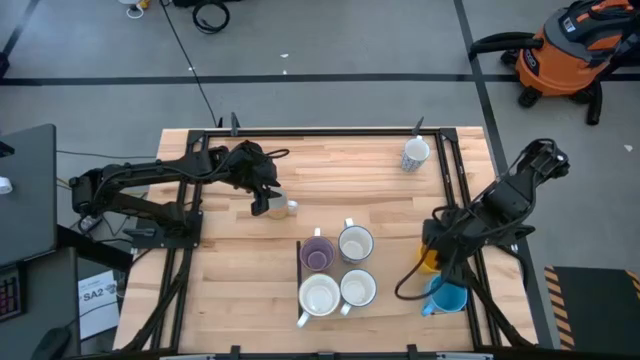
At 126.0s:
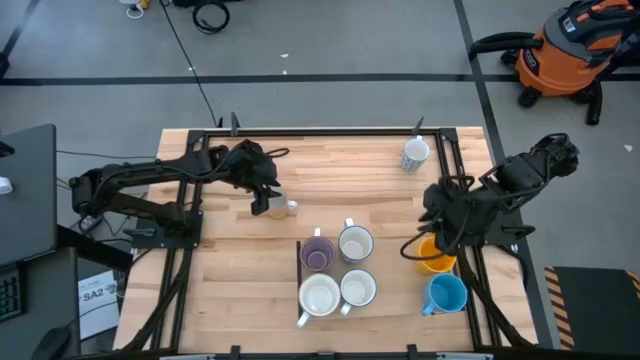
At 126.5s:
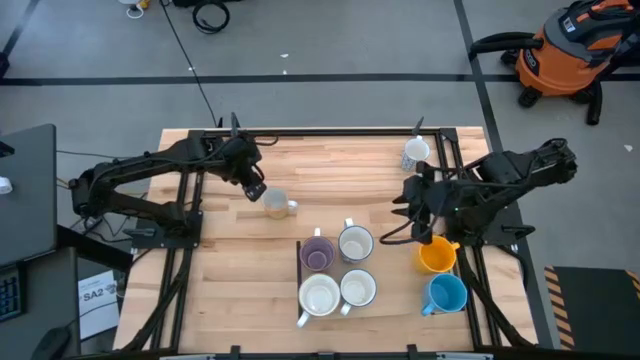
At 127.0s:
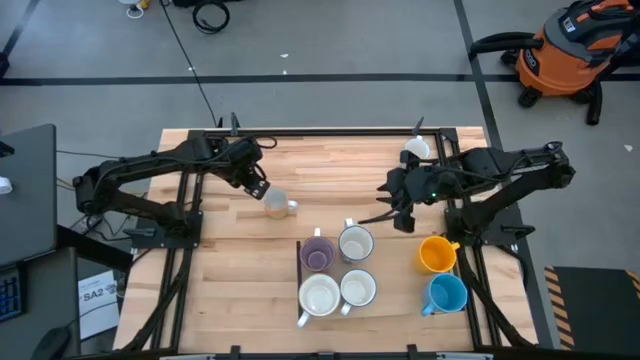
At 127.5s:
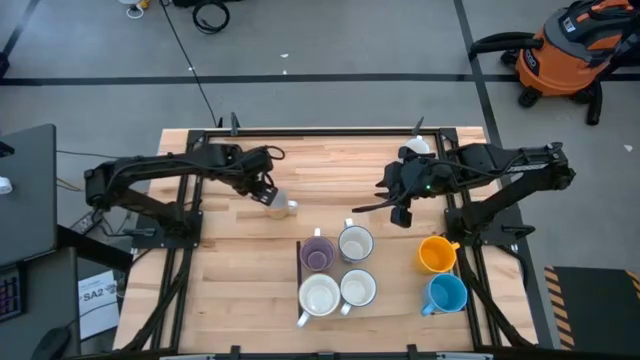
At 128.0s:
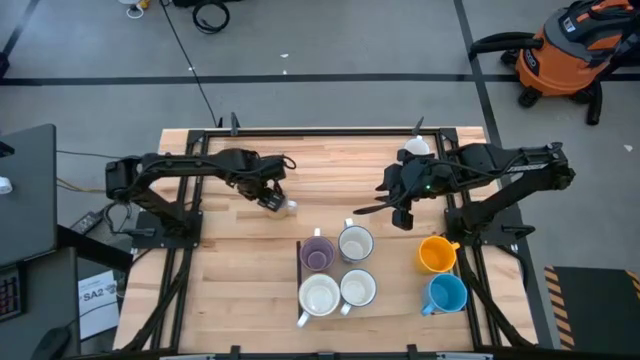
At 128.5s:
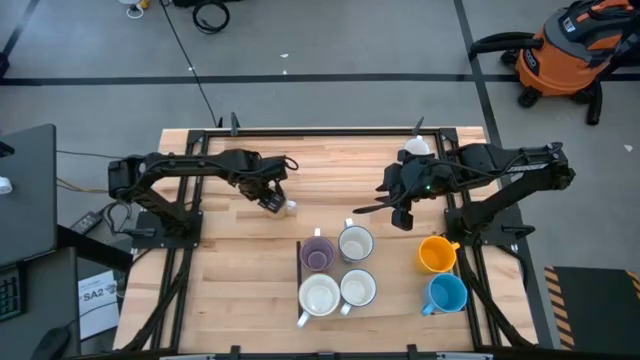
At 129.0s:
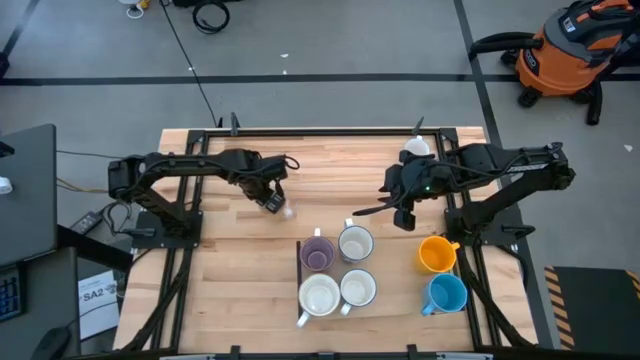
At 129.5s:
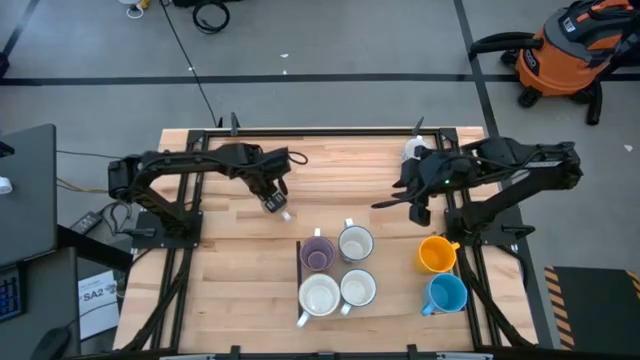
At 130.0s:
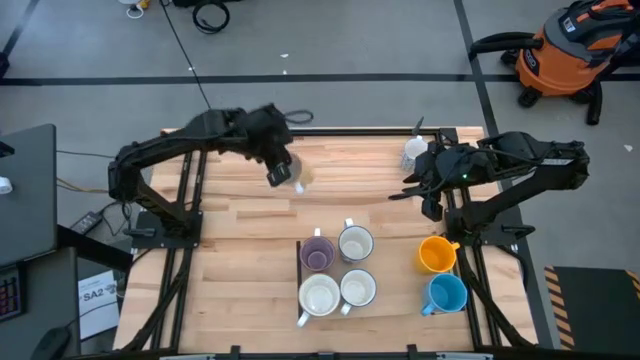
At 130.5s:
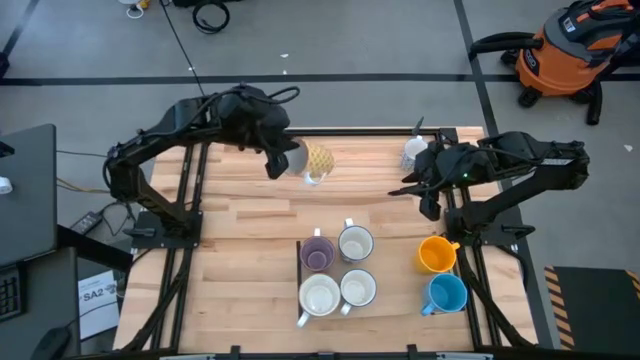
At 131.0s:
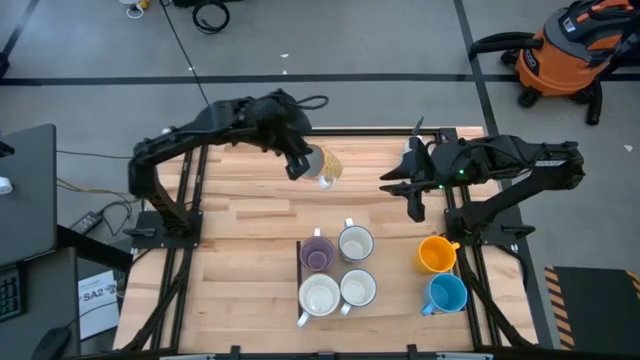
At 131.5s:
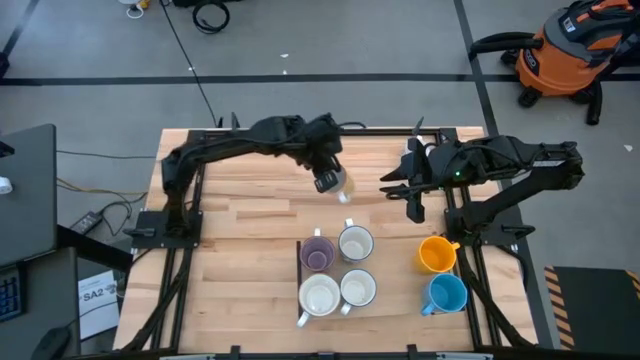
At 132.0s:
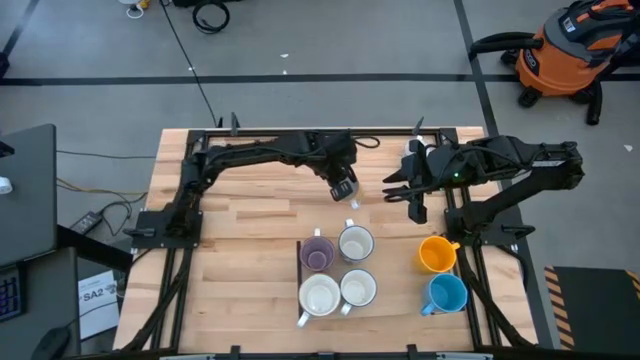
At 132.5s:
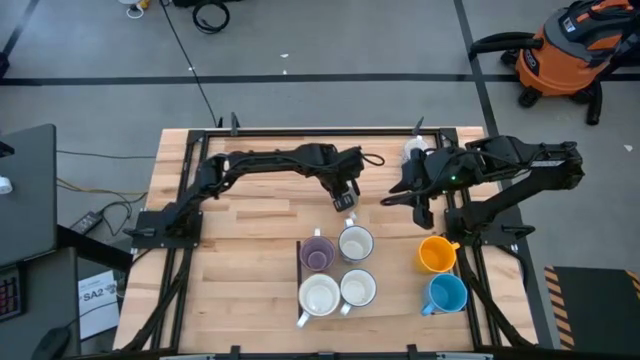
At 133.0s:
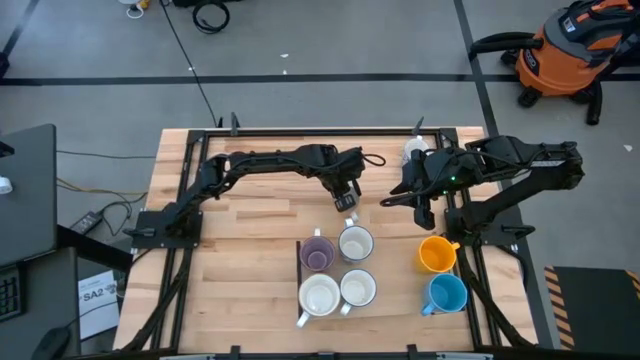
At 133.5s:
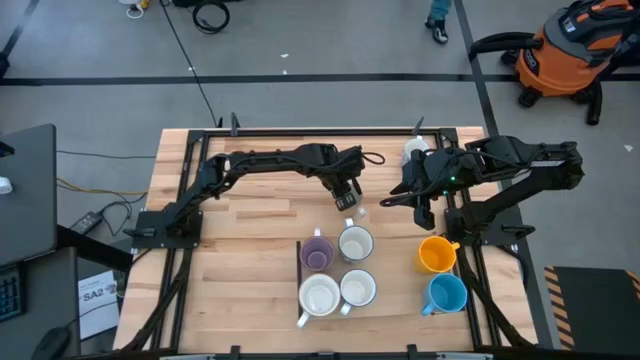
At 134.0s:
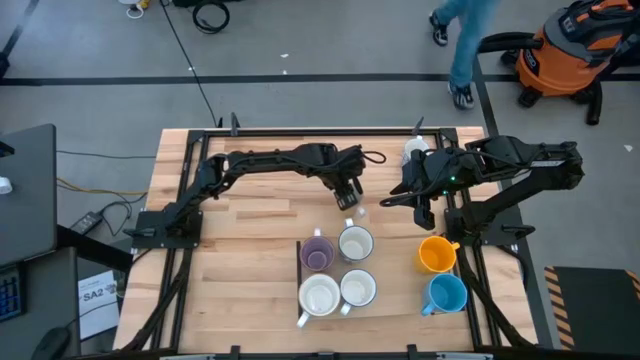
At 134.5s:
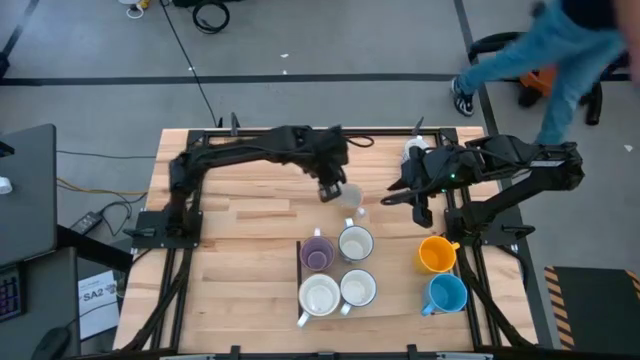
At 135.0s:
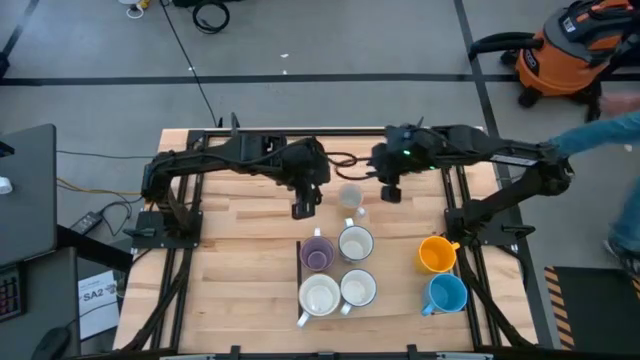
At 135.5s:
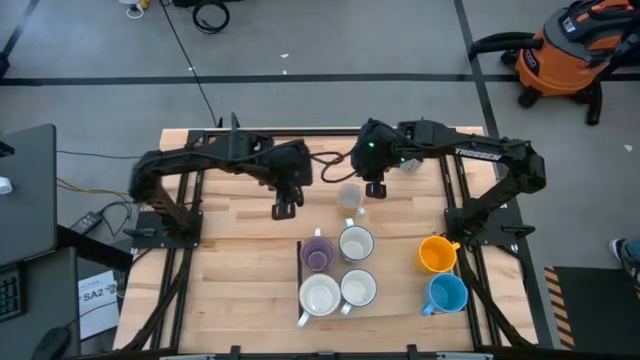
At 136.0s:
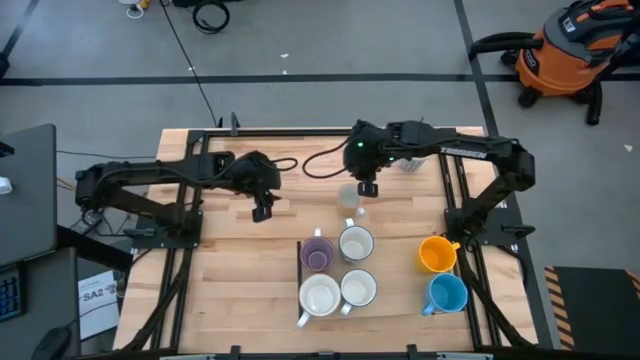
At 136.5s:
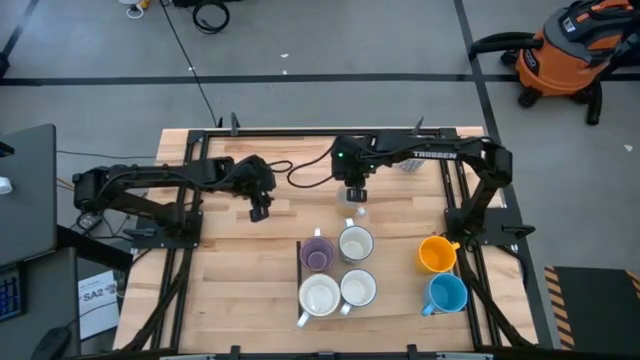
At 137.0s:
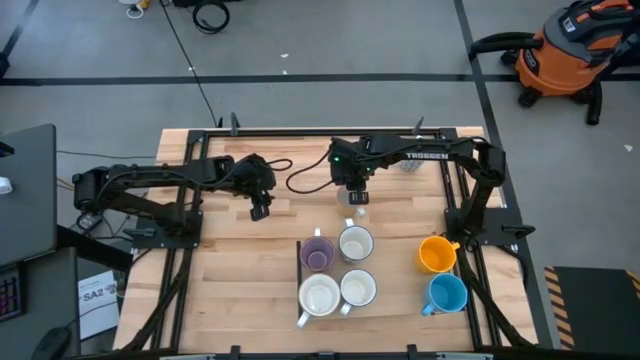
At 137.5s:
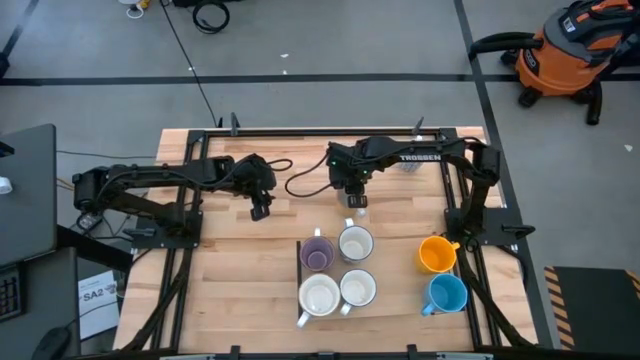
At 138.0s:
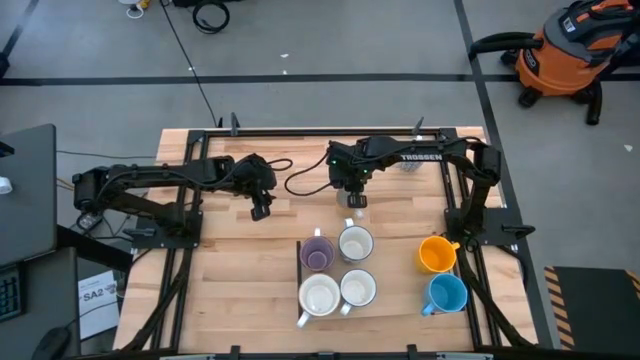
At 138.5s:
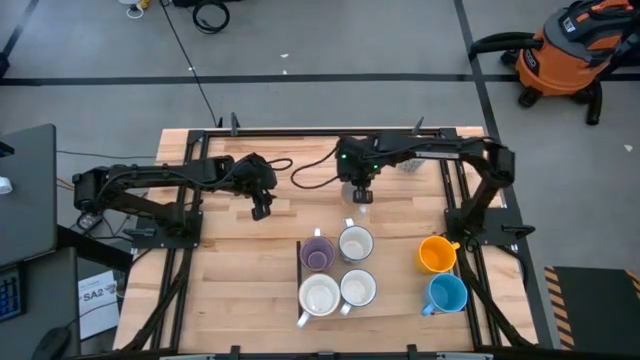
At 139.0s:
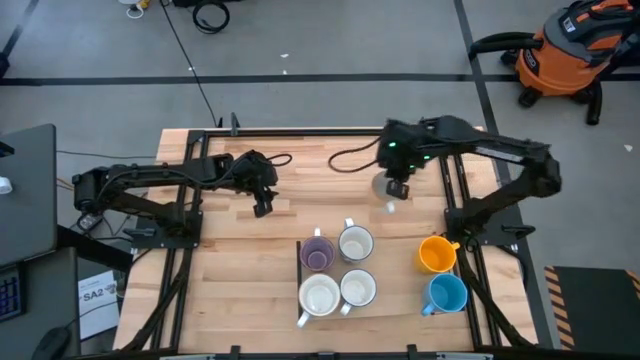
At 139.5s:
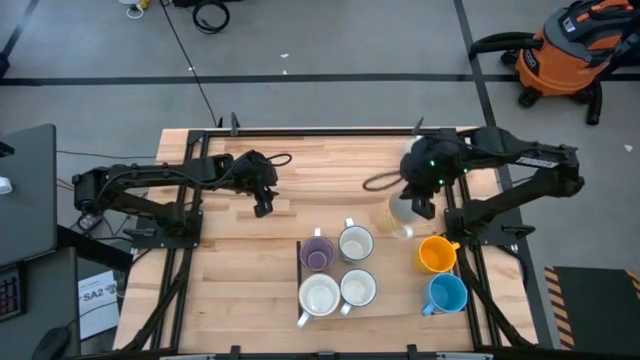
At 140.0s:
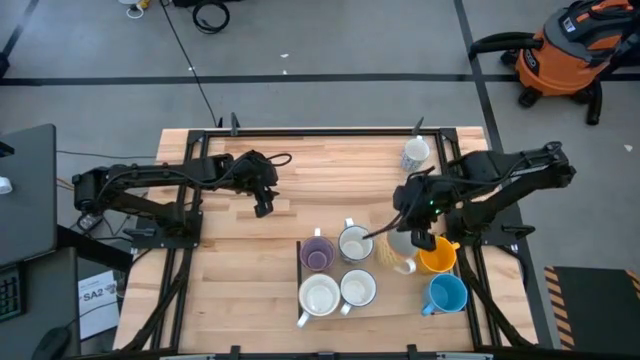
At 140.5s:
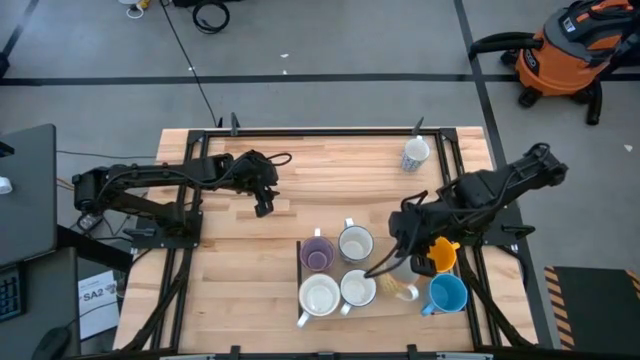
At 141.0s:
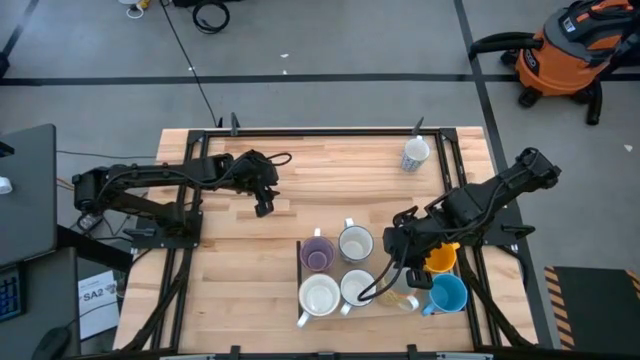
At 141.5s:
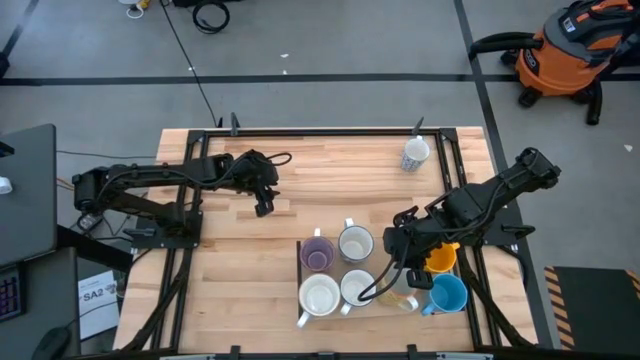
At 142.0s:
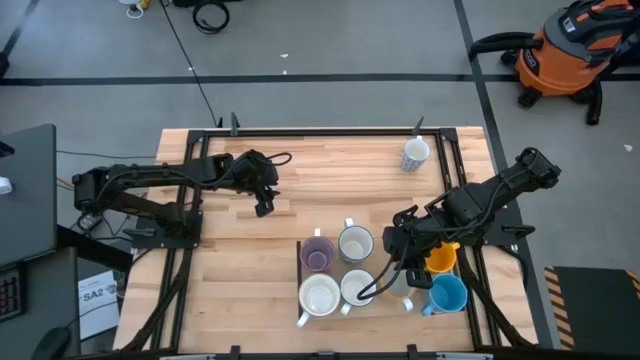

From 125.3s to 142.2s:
Task: Place coffee mugs
Put the white yellow patterned mug on the shelf

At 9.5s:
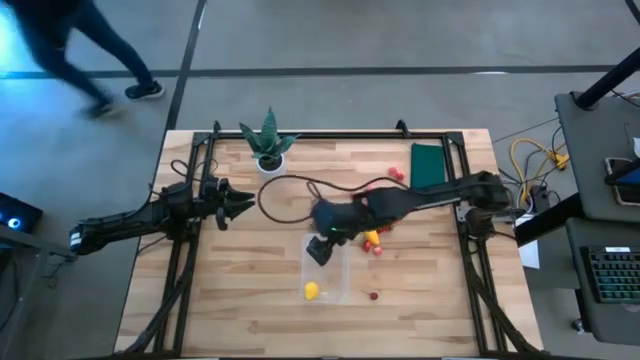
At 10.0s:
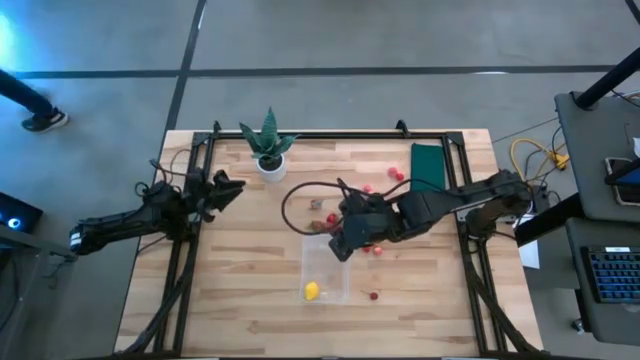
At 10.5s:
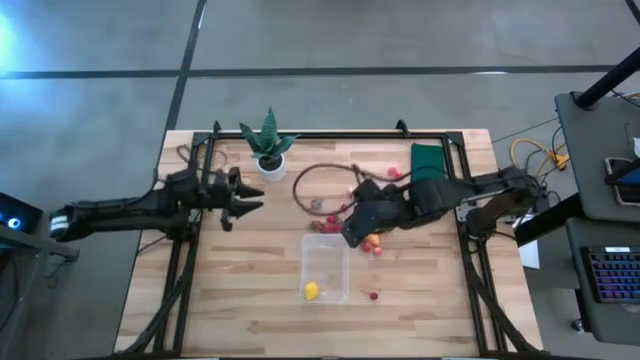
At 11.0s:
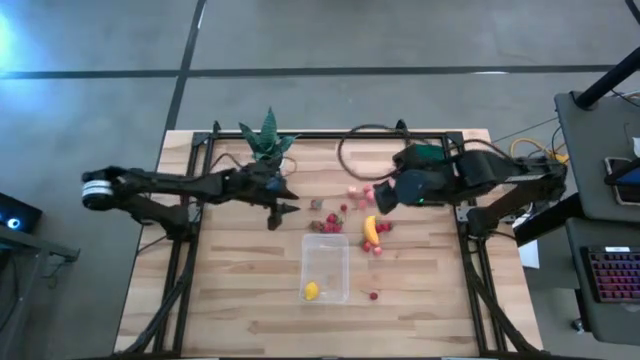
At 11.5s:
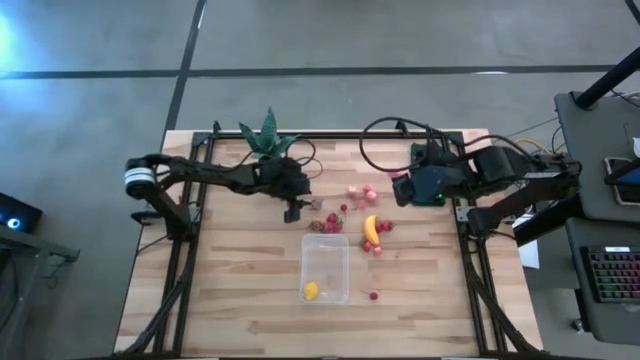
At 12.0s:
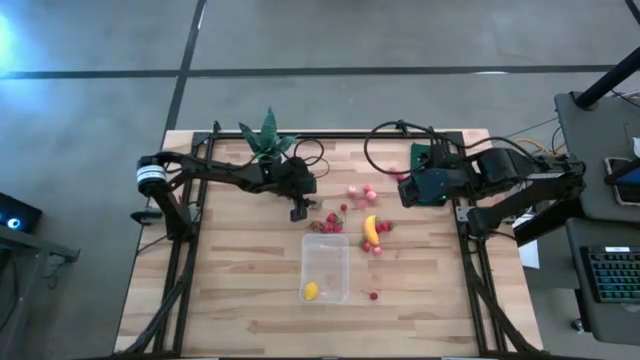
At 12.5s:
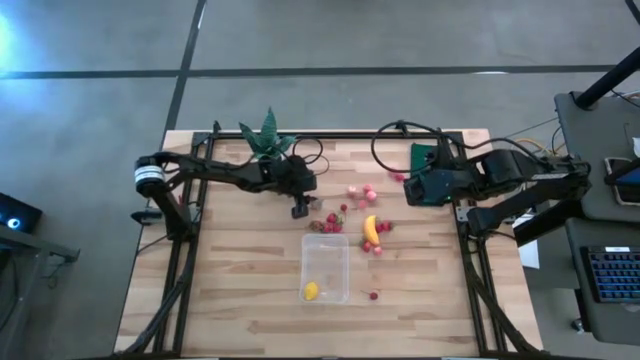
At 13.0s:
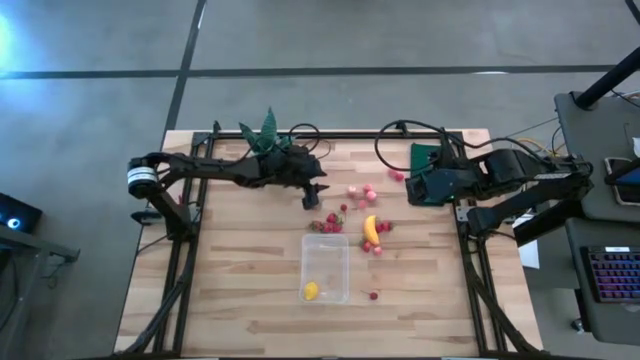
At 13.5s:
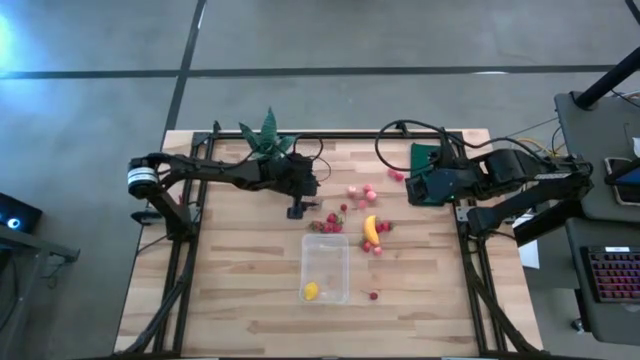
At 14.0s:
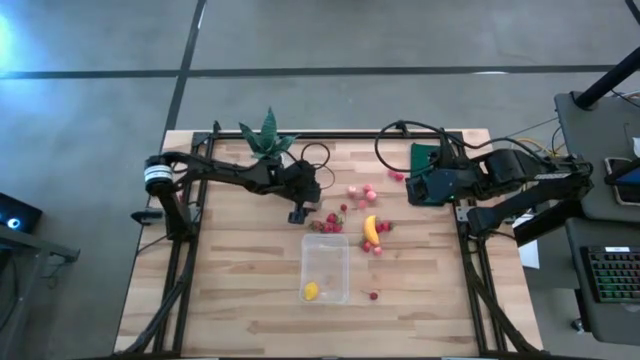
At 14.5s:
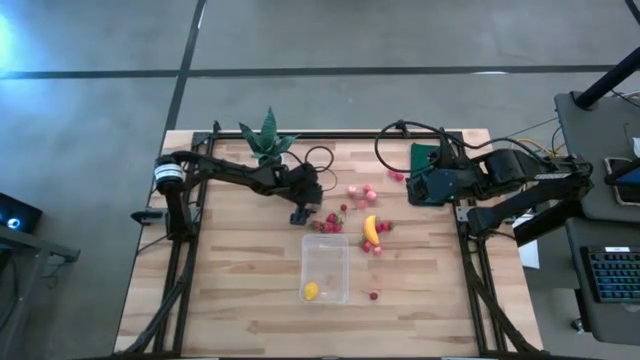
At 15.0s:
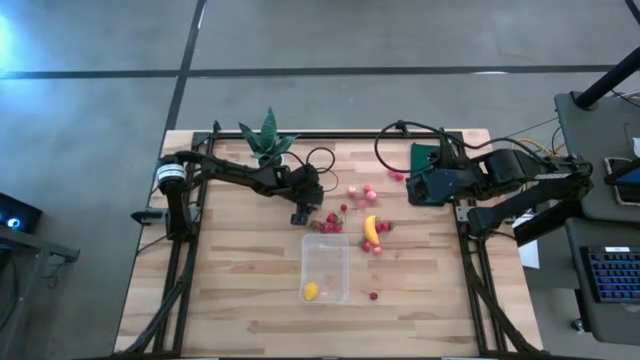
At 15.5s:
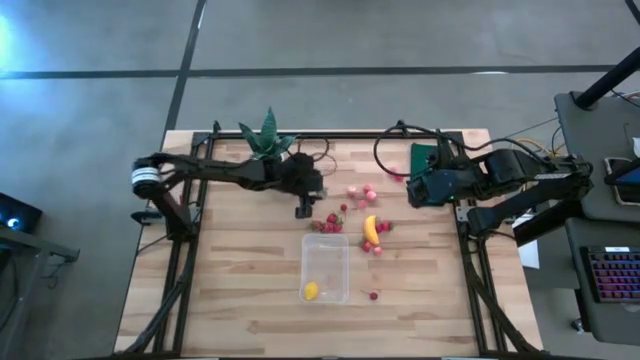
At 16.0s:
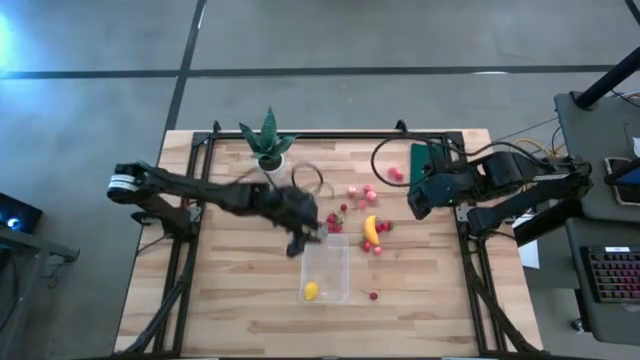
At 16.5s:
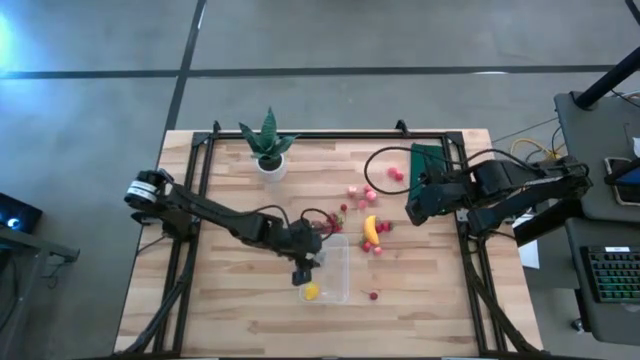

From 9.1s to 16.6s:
Task: Pick and placing Produce into tupperware
Put the strawberry into the transparent bin
